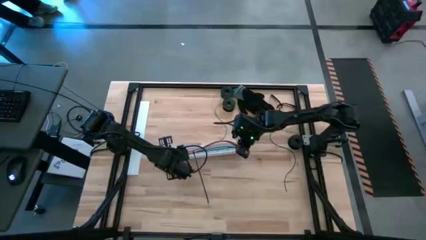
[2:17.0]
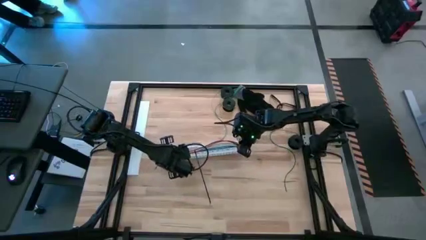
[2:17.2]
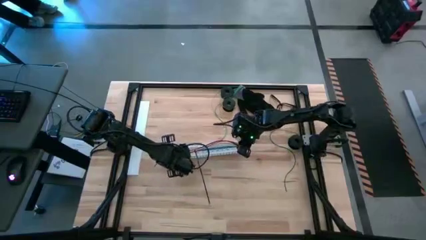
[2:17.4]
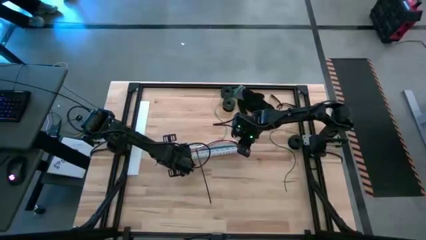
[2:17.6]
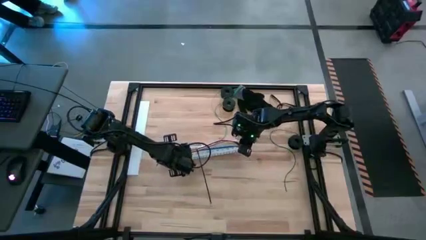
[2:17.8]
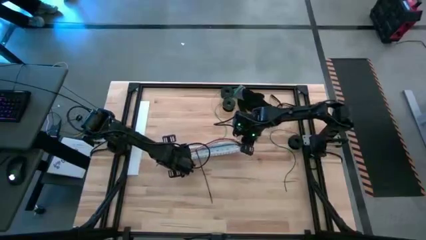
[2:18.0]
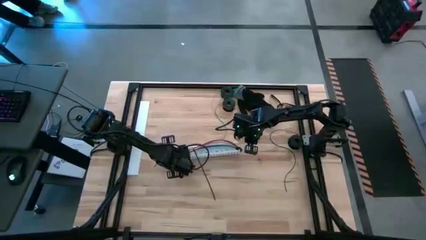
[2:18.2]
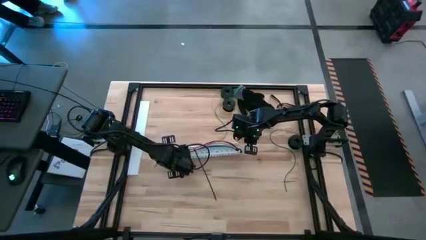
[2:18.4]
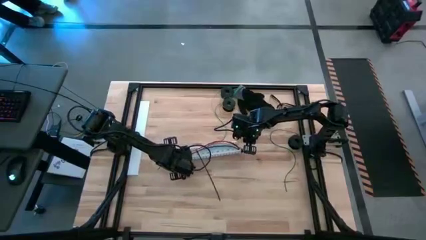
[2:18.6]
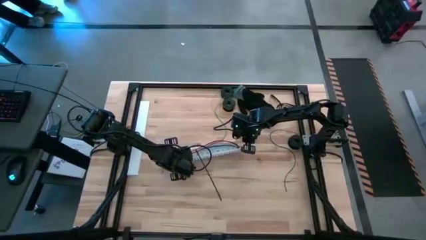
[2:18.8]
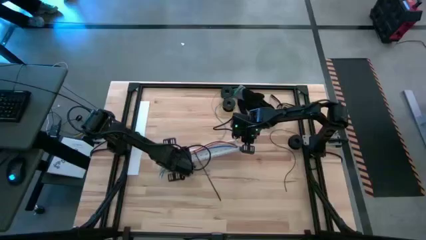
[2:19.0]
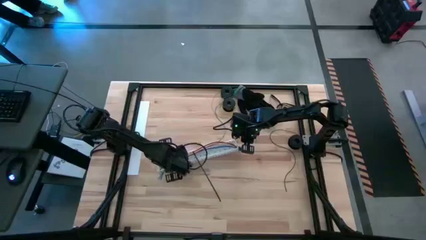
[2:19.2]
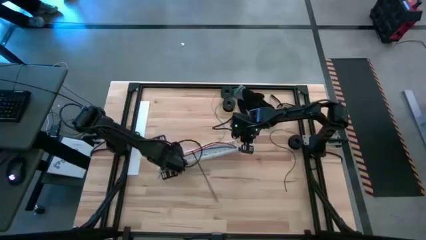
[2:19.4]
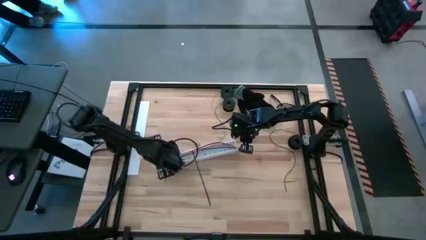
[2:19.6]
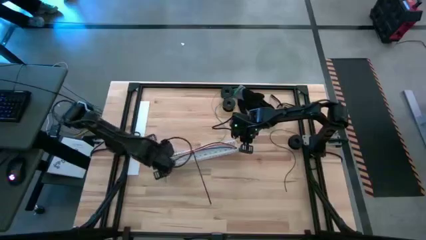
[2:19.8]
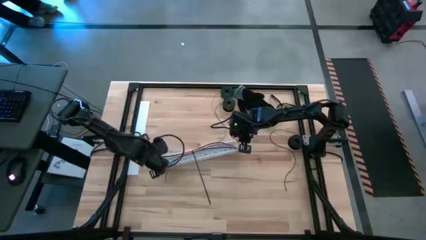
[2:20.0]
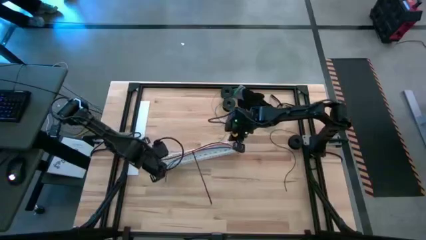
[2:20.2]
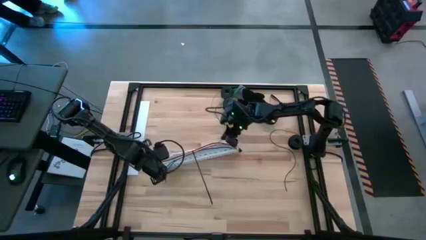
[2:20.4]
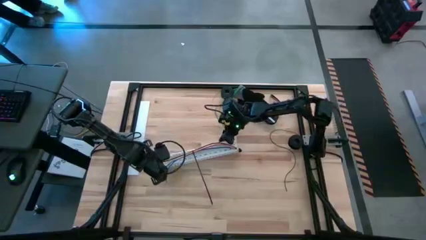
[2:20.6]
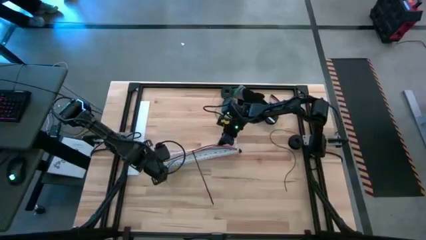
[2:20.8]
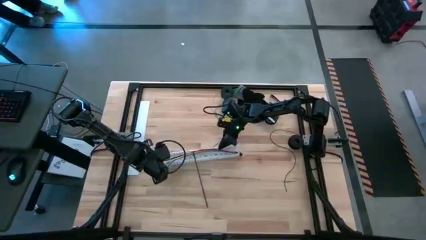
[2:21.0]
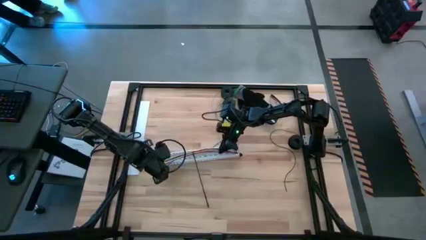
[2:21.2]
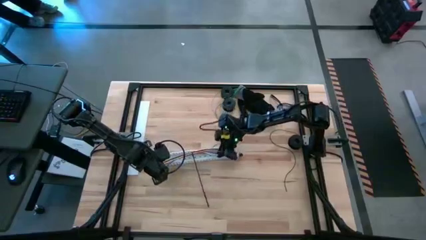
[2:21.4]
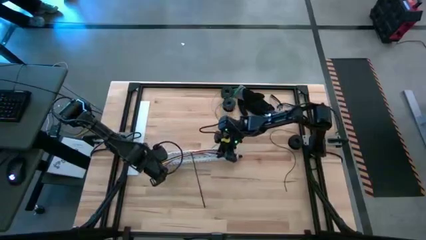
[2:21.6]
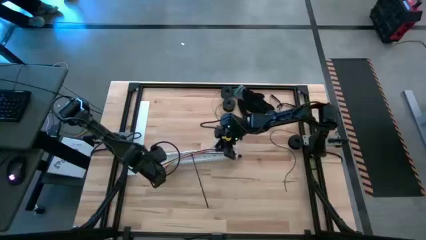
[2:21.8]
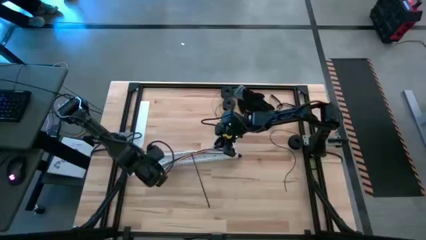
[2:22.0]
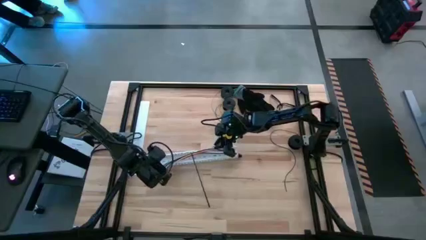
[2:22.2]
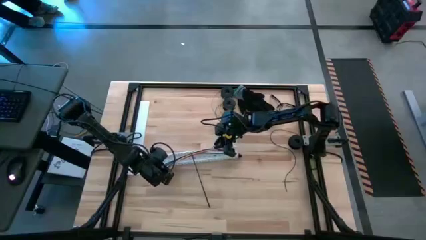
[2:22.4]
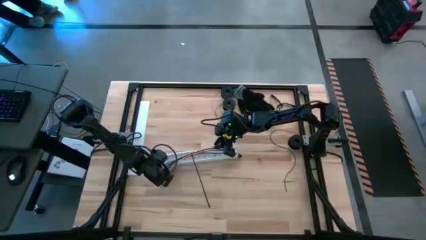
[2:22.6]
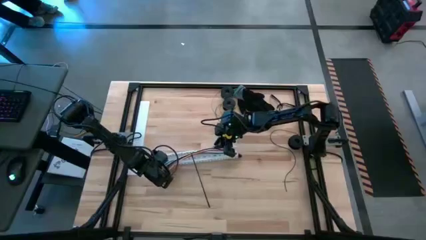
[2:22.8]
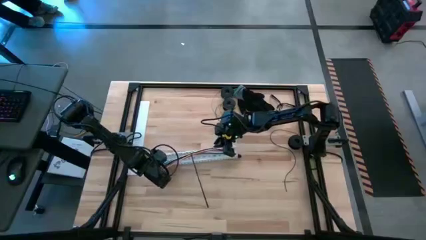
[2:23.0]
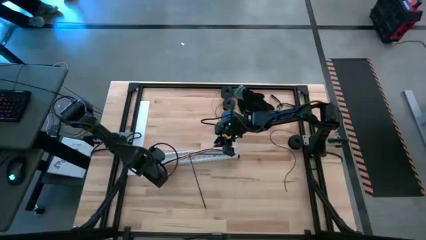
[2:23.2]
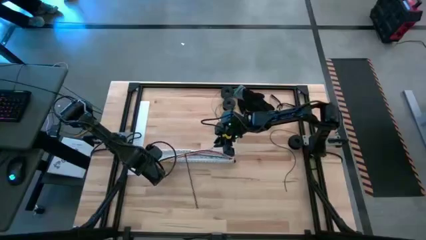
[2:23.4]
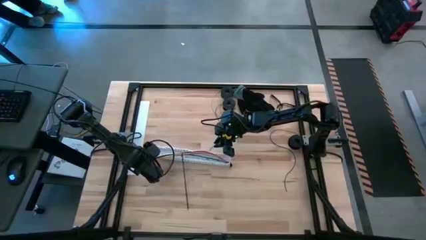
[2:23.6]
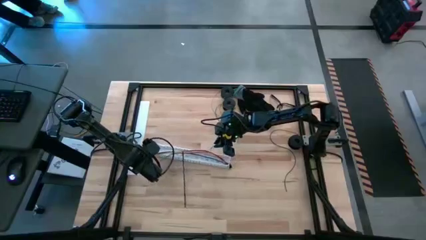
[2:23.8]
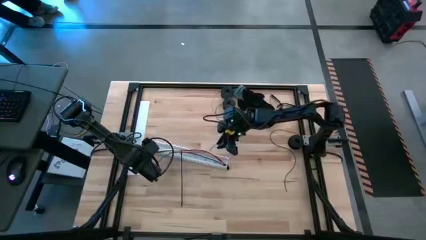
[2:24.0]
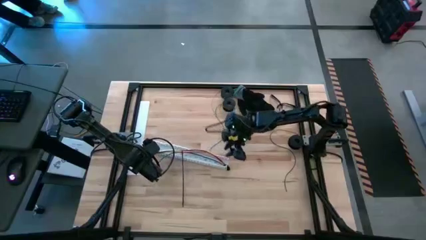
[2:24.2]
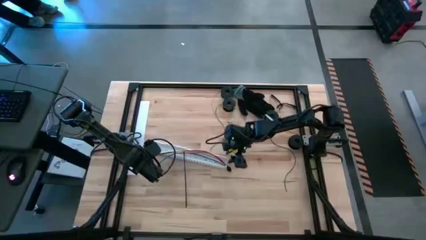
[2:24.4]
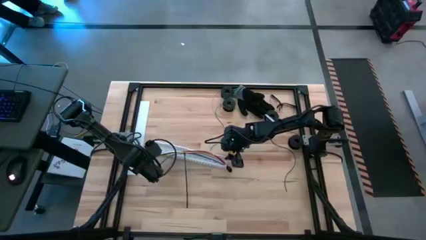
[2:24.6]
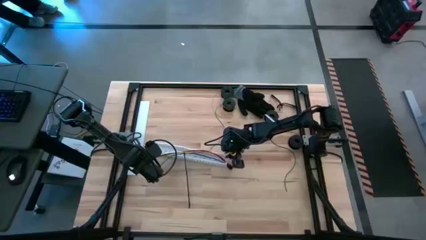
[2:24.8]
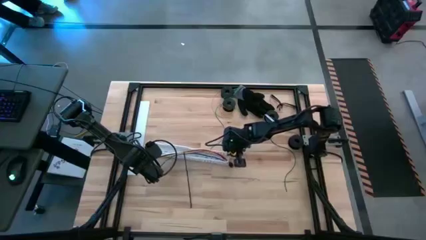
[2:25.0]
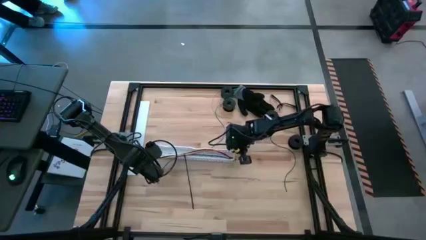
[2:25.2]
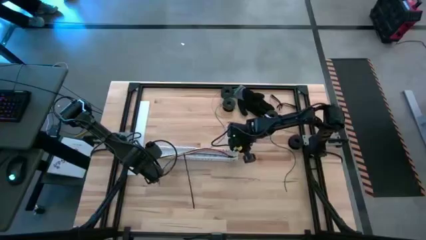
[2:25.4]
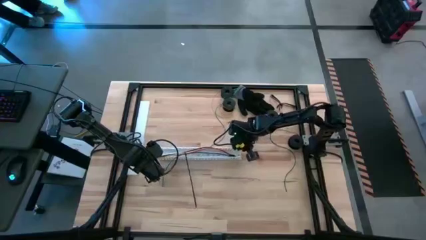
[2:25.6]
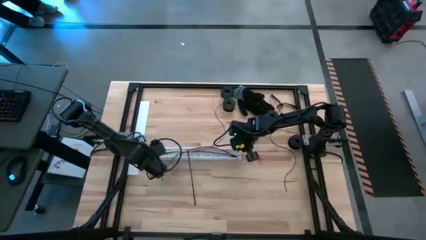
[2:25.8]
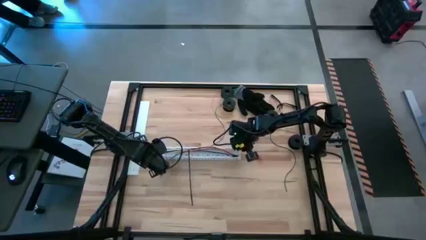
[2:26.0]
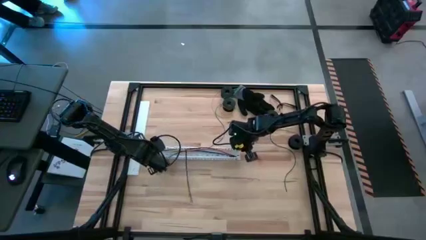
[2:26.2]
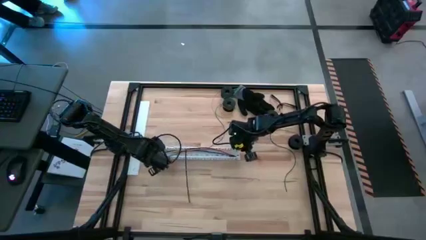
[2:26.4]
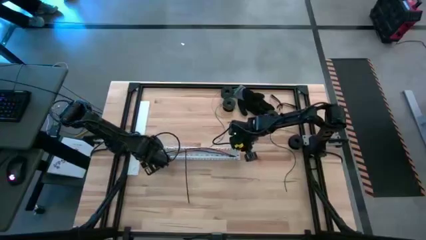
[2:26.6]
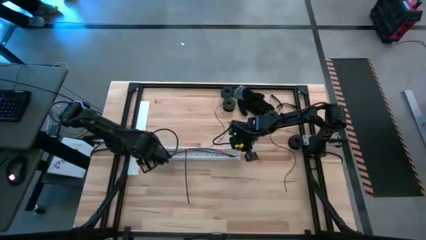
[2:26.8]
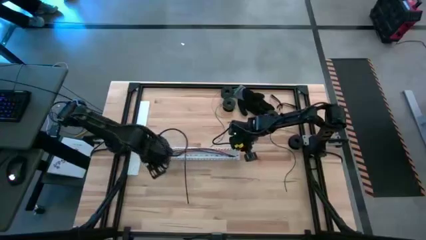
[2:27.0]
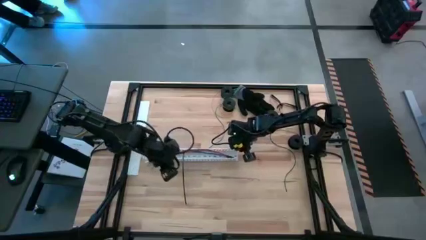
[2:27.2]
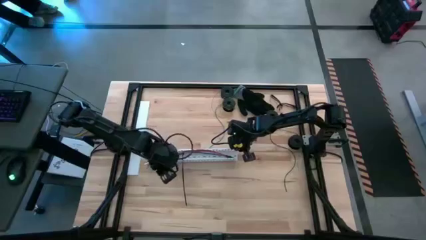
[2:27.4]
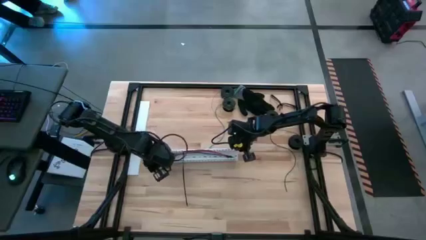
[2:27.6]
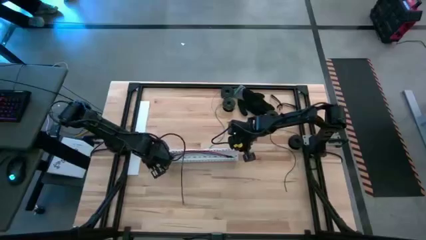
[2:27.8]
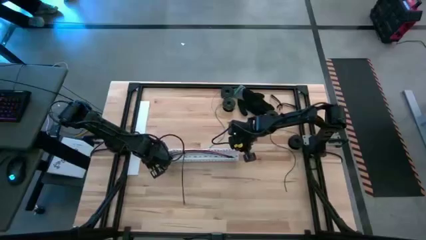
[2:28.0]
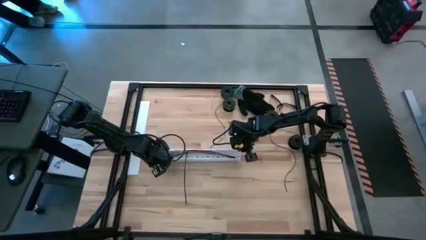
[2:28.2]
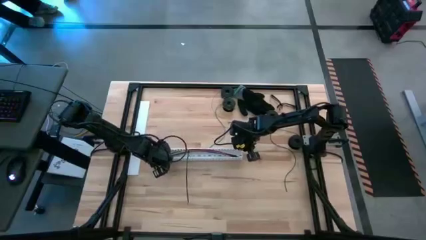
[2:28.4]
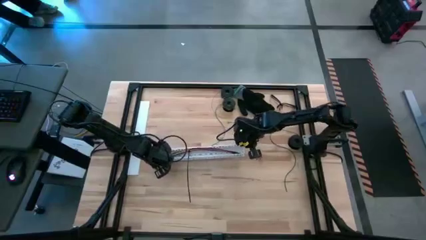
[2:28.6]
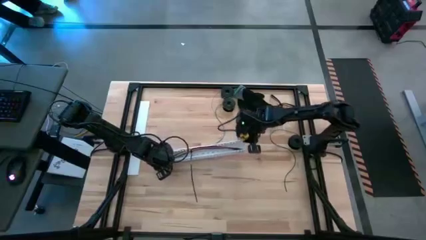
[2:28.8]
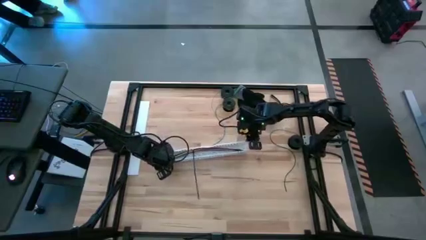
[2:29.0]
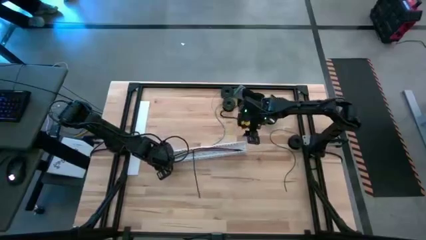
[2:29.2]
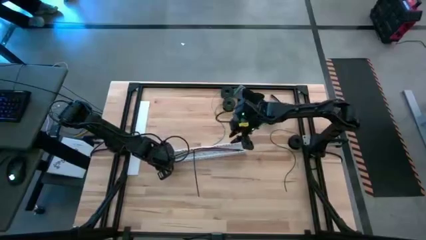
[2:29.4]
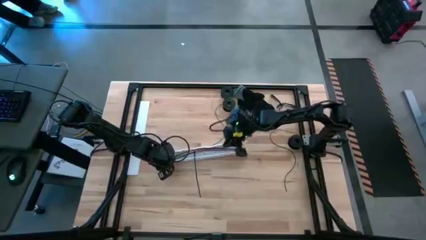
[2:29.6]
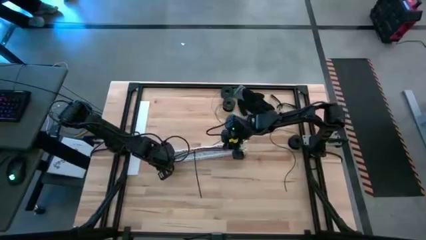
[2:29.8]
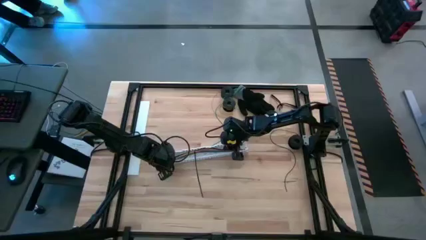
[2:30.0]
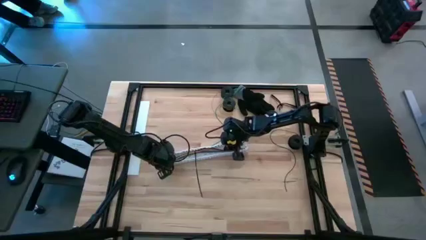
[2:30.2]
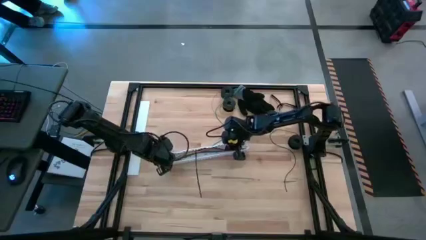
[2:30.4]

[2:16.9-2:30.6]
Task: Ziptie cables
Put ziptied cables in a white cable duct

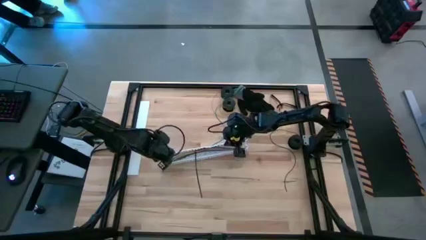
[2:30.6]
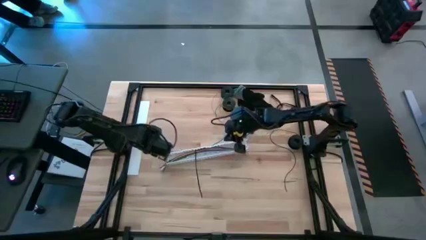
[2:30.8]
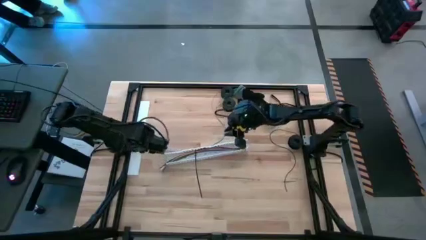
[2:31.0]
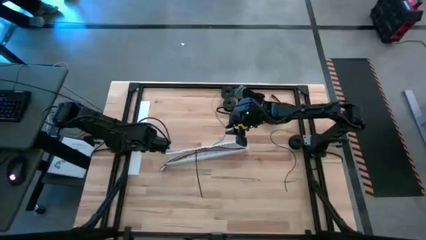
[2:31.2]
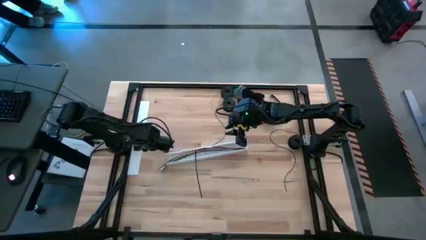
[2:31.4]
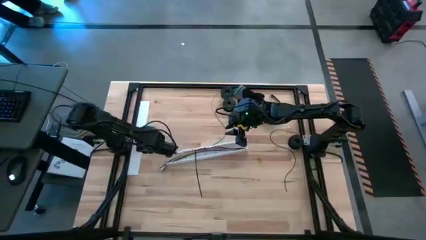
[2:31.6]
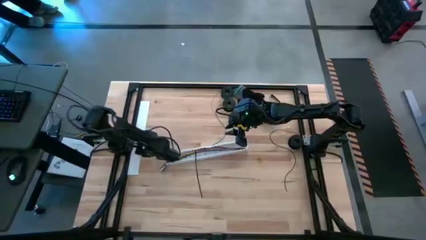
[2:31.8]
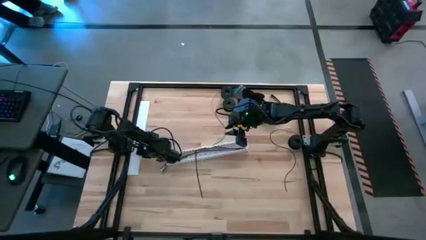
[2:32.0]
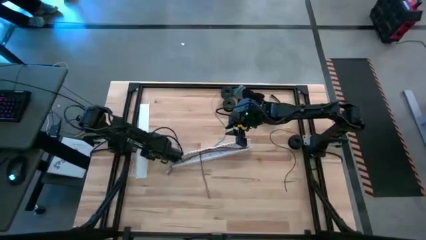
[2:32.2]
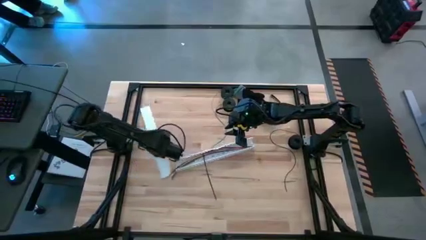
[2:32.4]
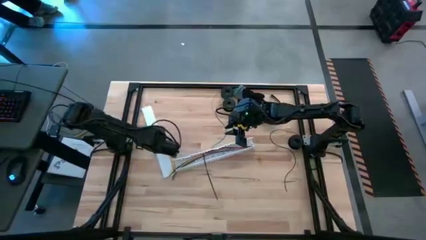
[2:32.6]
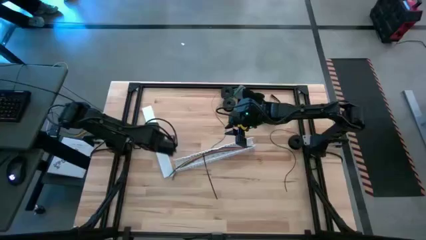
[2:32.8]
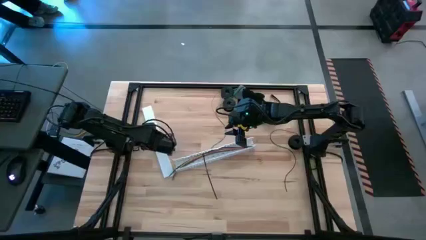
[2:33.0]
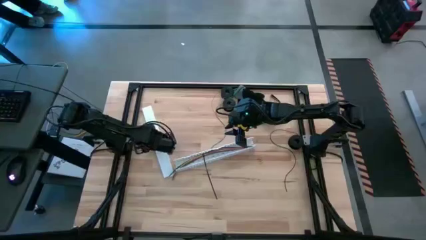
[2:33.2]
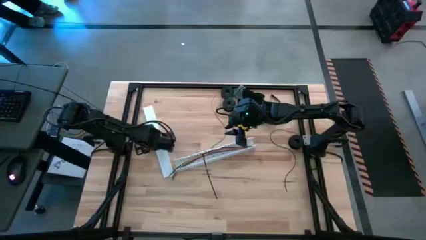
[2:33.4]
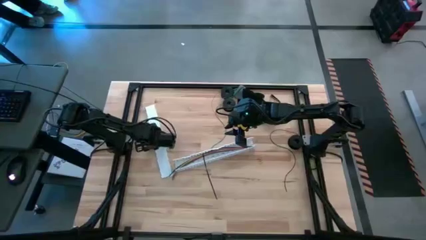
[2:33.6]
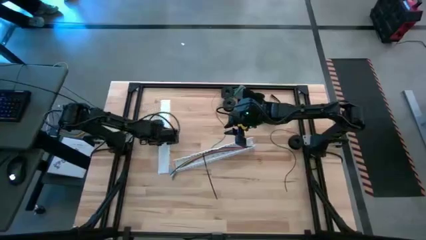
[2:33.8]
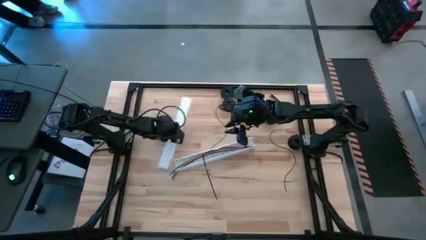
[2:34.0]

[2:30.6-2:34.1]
Close the white cable duct
